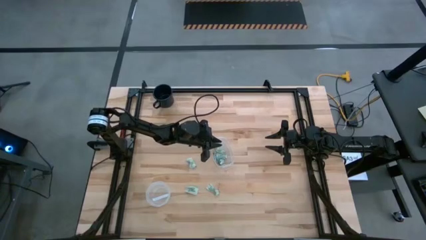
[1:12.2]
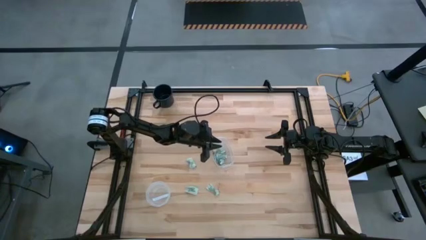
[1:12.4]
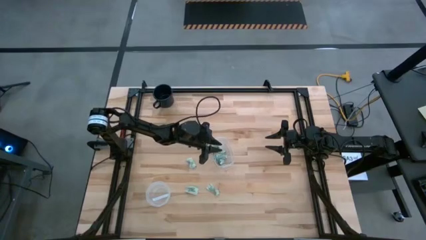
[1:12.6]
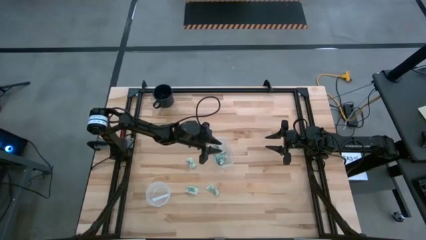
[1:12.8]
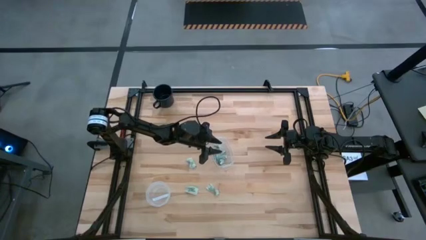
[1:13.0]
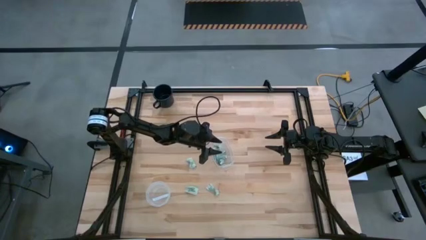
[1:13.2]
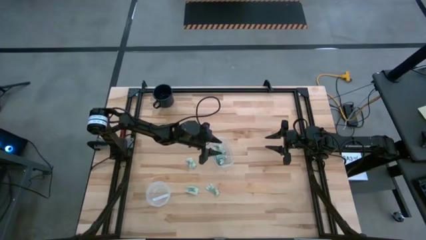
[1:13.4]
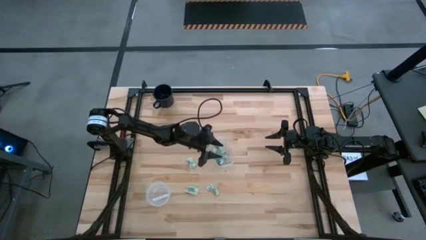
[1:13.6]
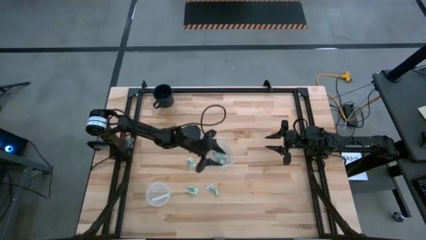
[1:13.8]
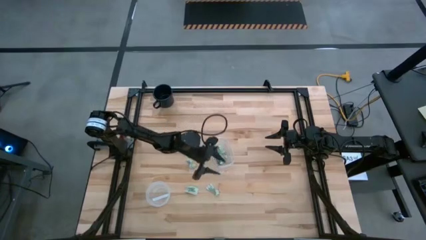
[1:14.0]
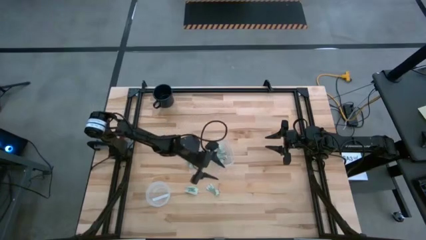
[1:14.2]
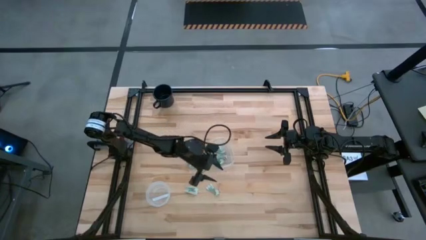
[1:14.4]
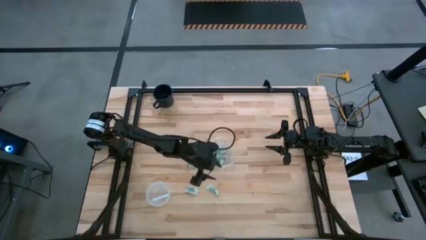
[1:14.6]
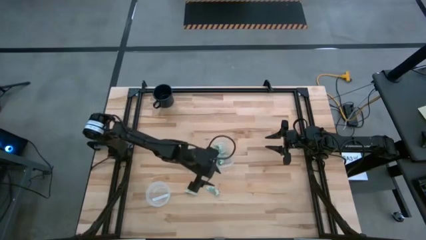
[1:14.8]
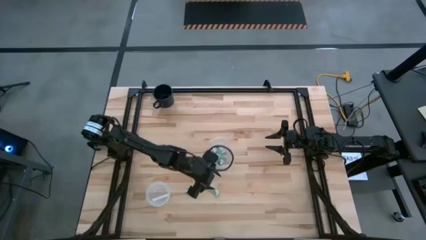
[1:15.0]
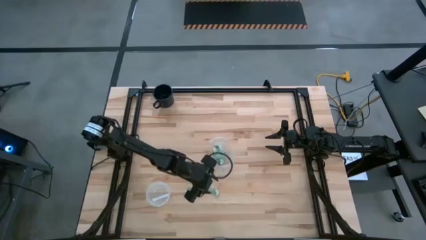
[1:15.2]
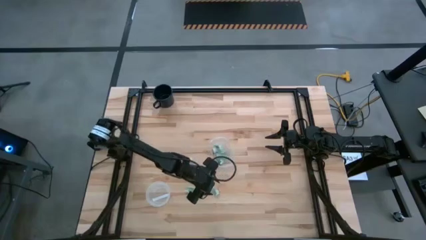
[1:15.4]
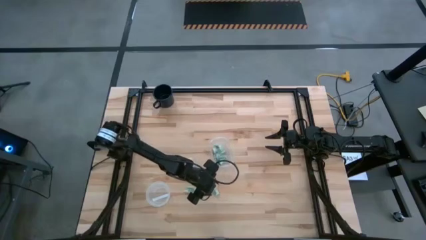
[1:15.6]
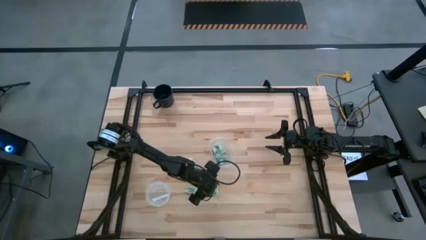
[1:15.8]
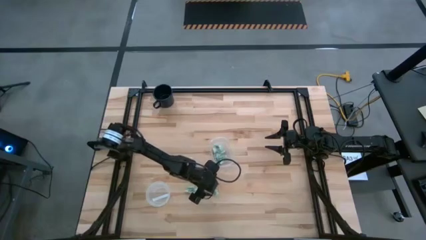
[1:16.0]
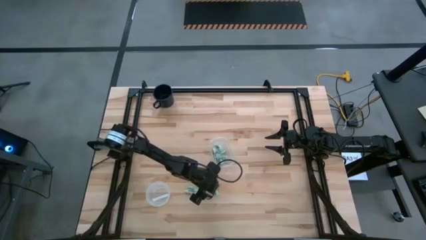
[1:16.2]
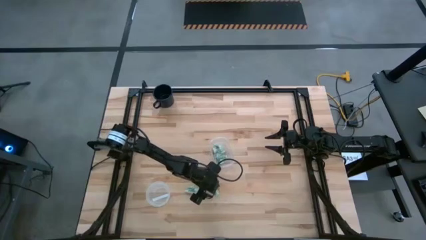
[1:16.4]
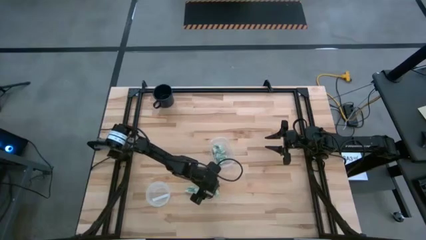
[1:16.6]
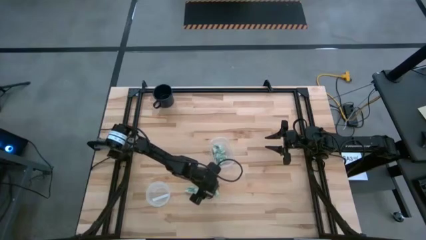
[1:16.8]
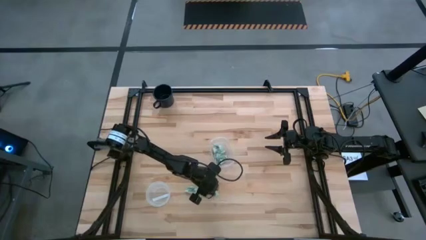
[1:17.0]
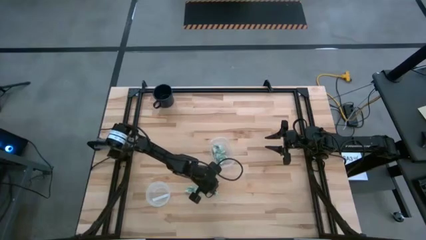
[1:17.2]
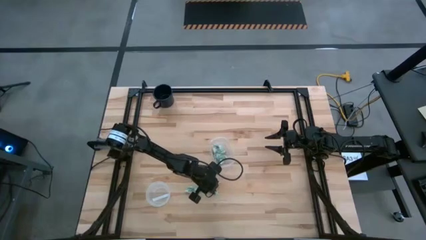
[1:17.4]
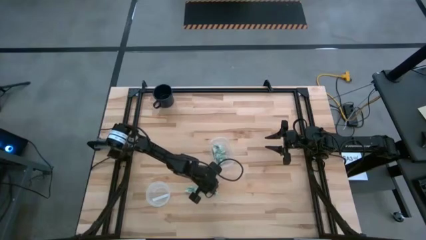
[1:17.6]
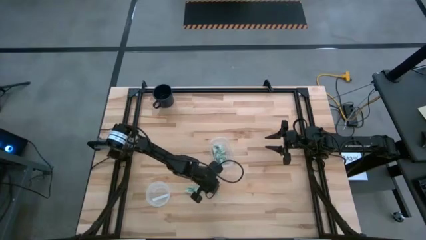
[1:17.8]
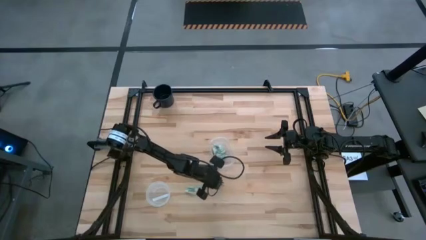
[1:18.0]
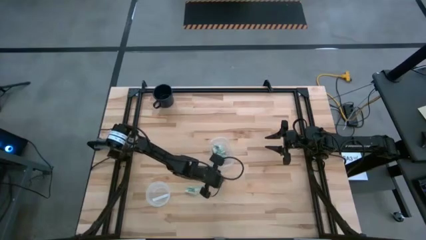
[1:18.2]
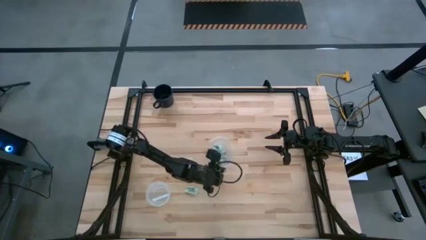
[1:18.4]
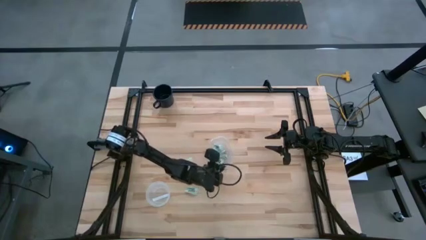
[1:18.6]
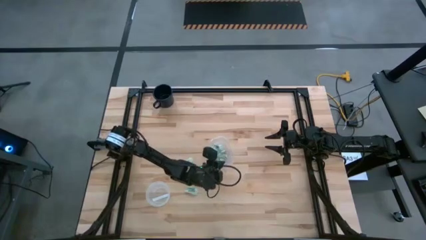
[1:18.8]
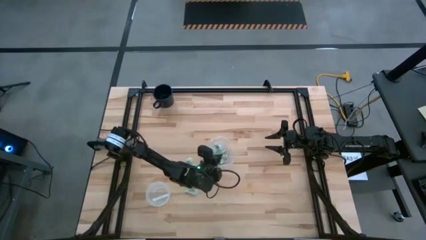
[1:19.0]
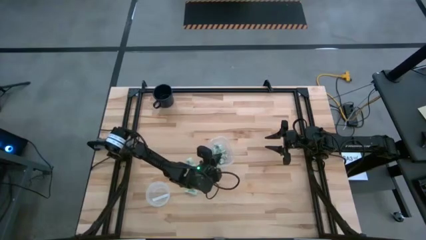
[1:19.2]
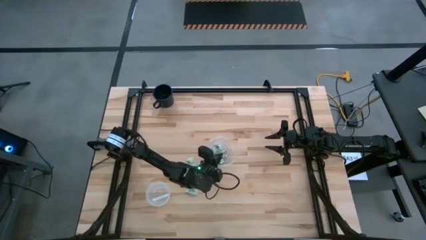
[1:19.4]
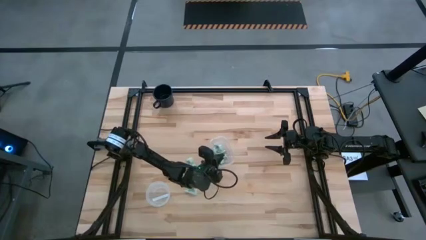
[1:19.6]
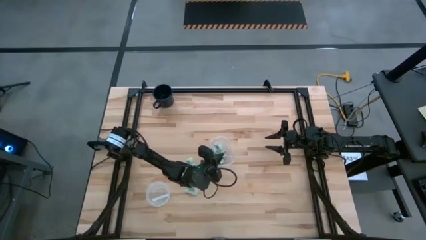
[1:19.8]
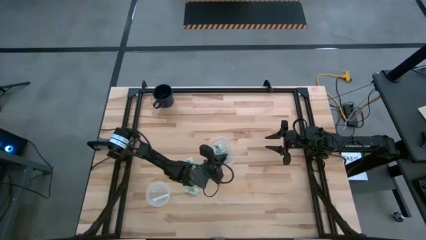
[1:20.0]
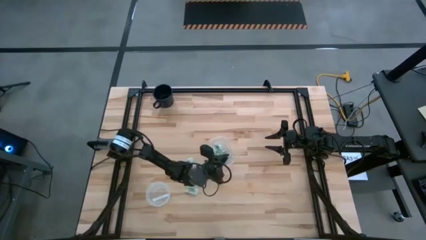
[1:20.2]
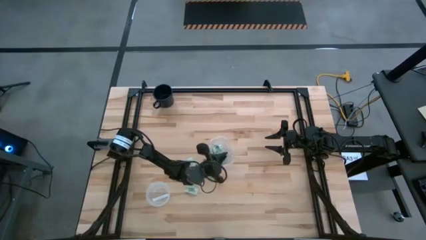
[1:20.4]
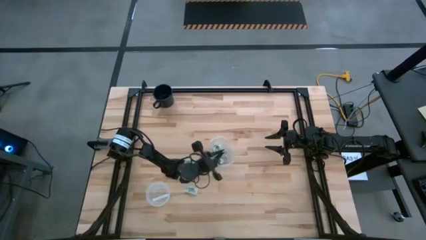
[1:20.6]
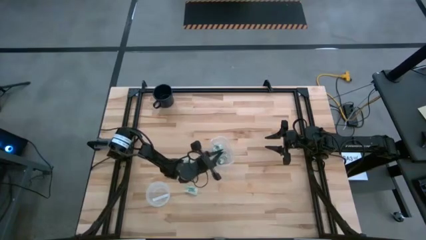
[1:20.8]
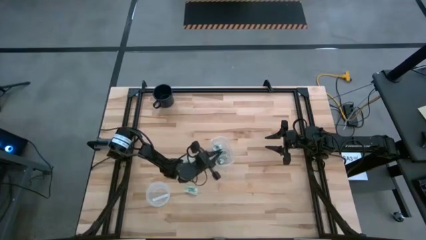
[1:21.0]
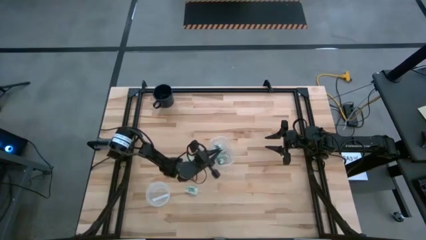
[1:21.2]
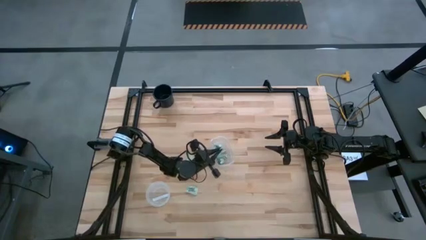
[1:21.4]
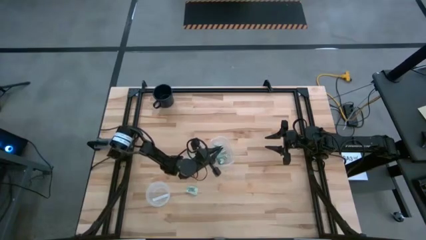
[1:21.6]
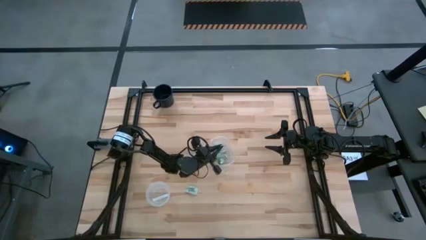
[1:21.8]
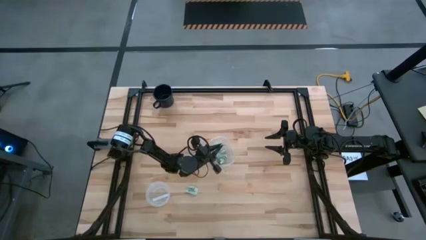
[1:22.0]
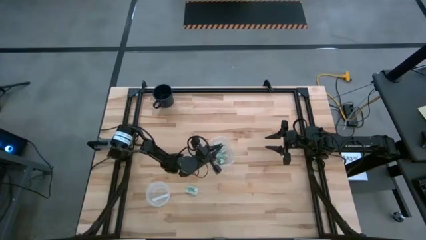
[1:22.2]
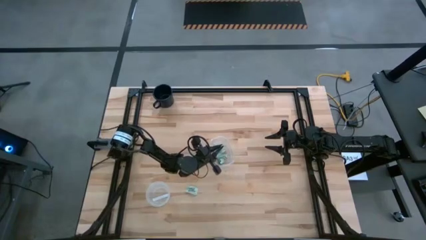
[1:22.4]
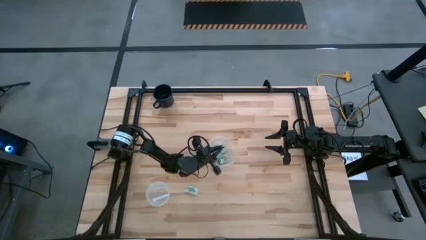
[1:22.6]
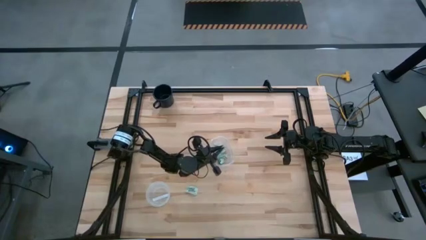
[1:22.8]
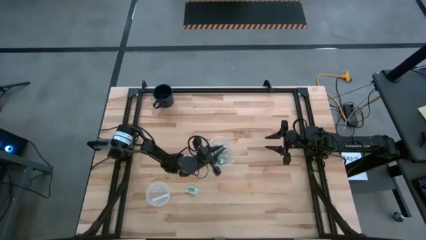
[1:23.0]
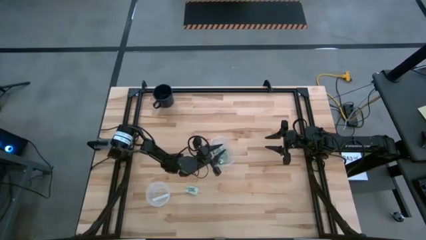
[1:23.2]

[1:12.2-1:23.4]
Task: Pick and place items into bin
Put the stevia packet into the transparent bin

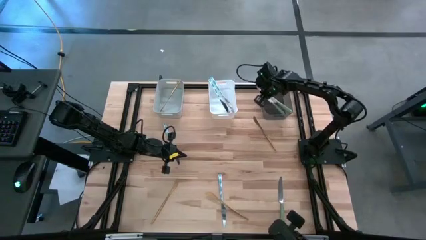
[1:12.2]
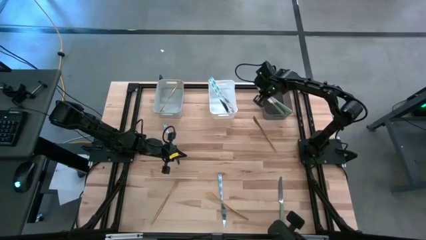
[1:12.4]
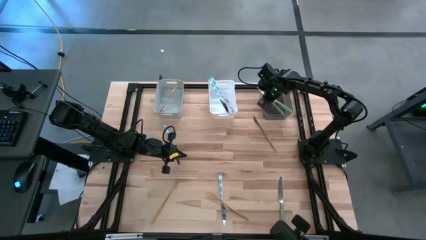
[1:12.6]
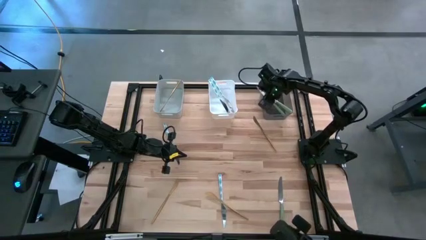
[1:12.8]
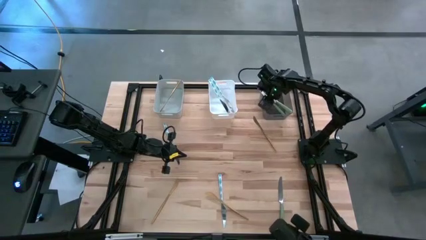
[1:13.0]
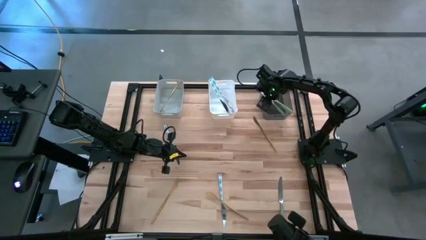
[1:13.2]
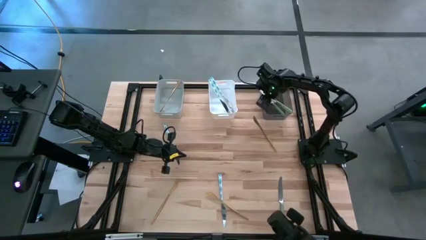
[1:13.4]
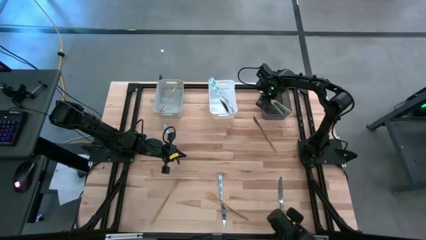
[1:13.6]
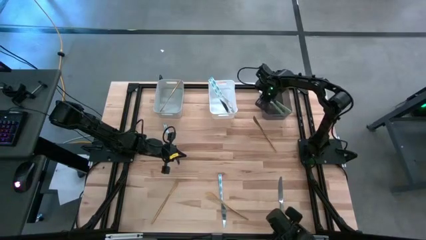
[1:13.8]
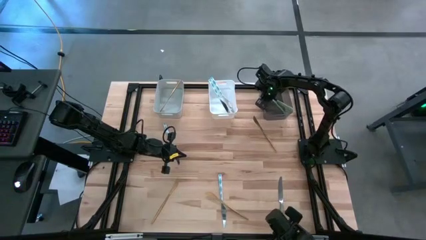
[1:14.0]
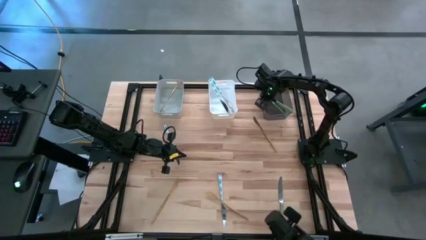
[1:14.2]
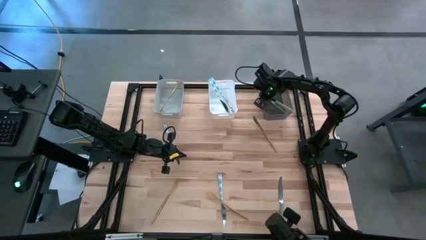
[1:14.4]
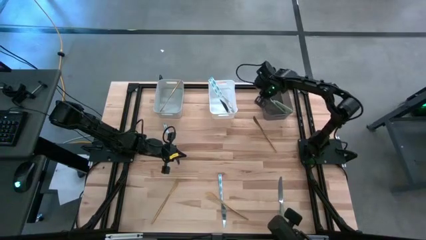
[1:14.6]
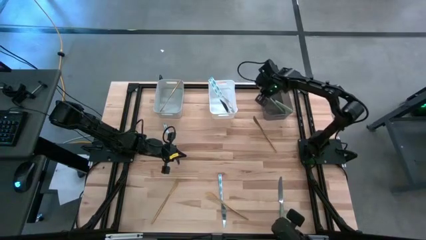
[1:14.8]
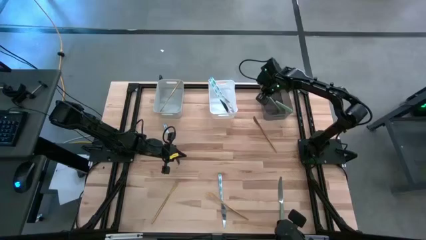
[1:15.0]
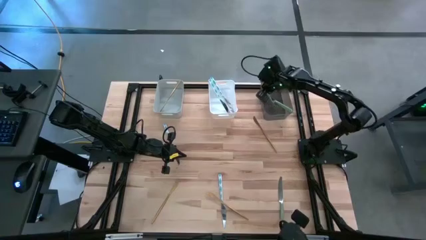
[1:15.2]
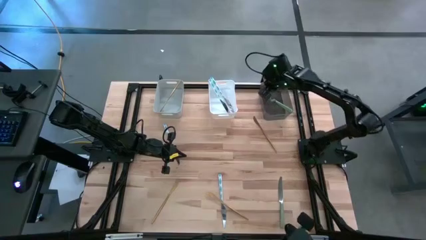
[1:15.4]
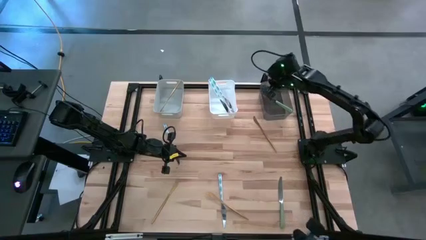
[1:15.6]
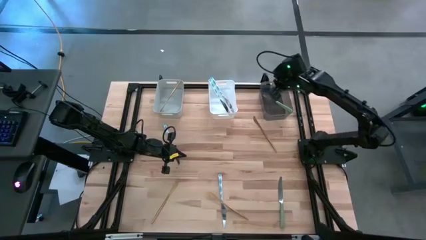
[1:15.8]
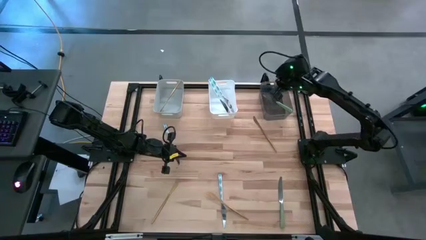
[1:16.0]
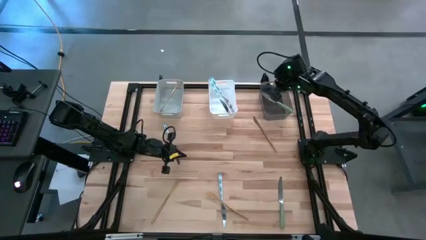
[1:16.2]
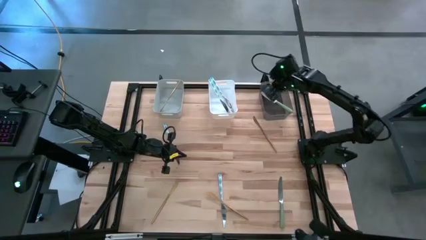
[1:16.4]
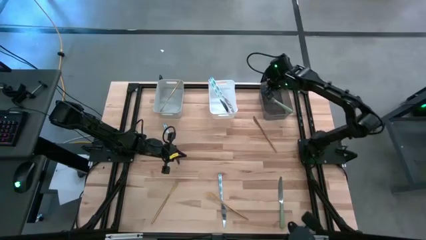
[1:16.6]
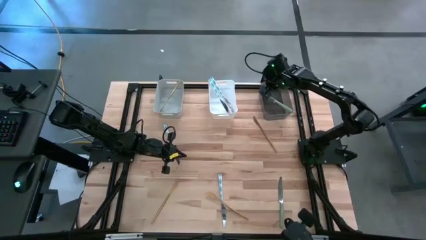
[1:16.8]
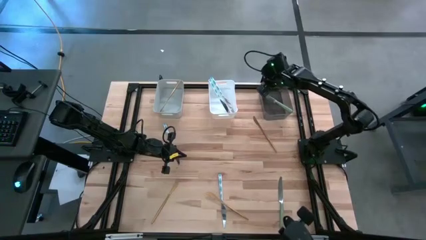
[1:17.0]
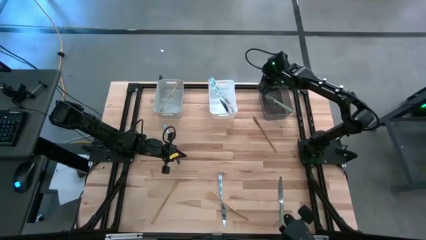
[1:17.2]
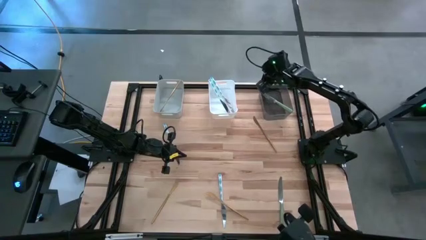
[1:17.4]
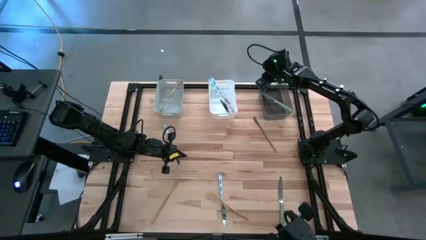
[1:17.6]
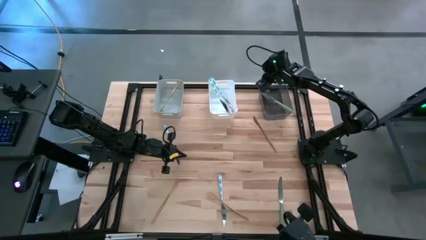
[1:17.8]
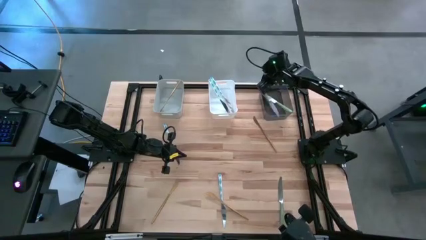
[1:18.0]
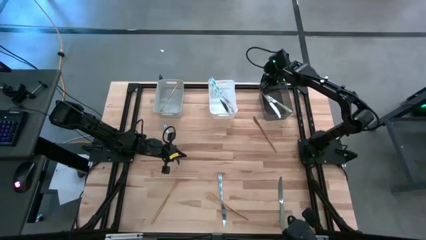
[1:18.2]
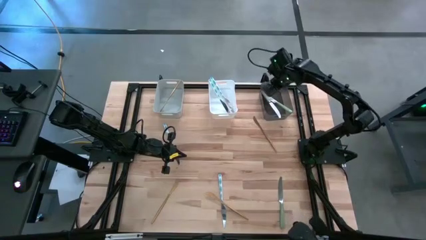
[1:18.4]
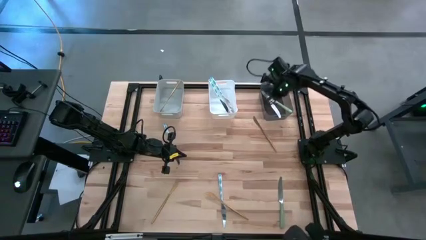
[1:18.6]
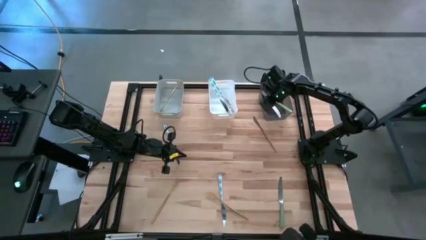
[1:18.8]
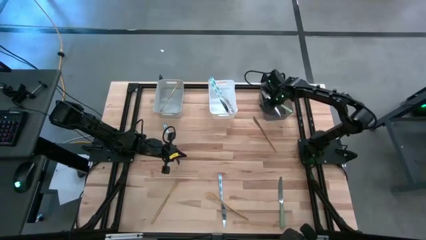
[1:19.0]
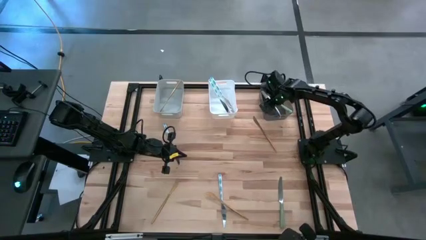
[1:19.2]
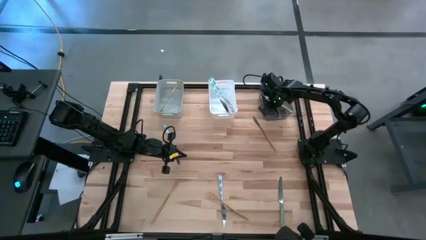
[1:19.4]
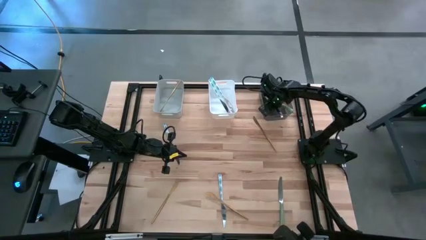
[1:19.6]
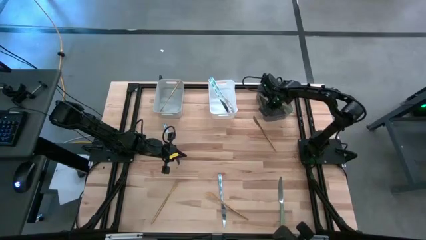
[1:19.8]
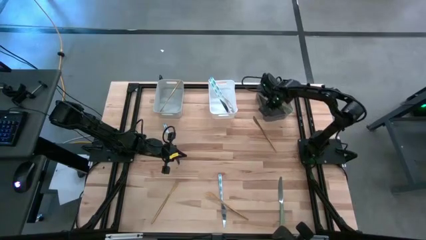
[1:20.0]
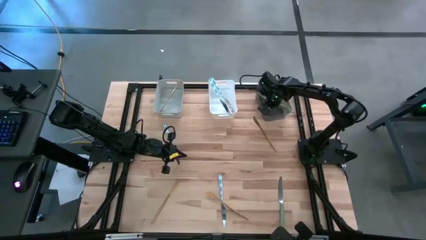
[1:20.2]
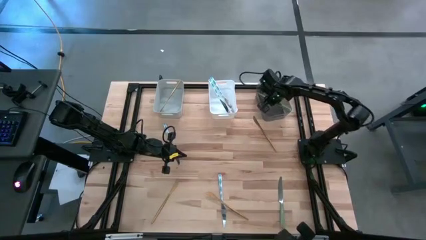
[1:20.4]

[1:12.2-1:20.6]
Task: Sort silverware by color (type)
Adjust the green table knives in the bin
